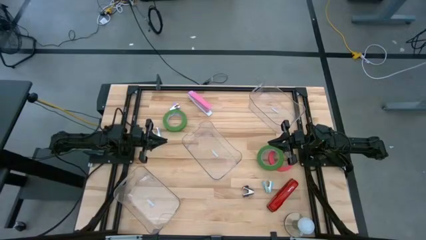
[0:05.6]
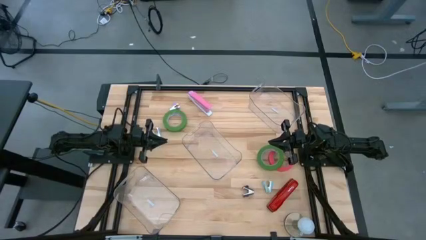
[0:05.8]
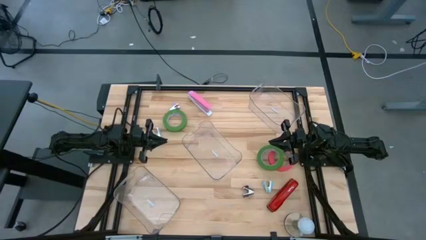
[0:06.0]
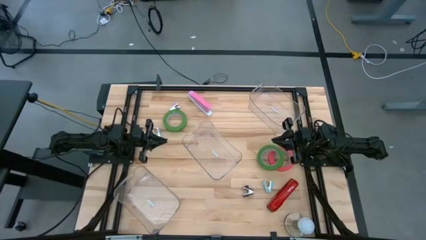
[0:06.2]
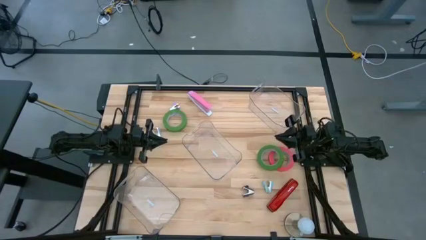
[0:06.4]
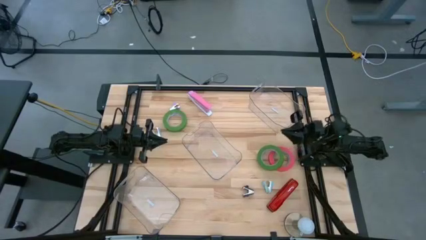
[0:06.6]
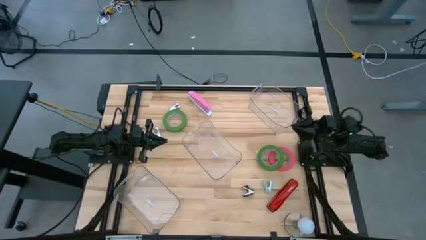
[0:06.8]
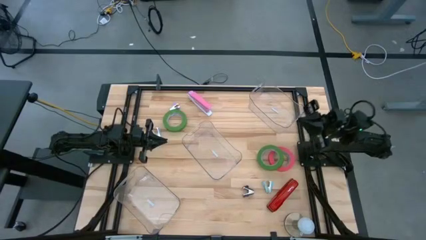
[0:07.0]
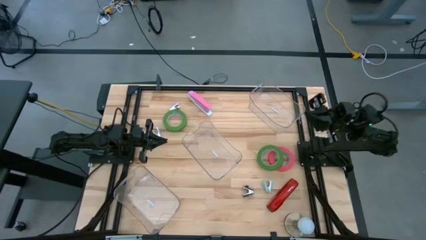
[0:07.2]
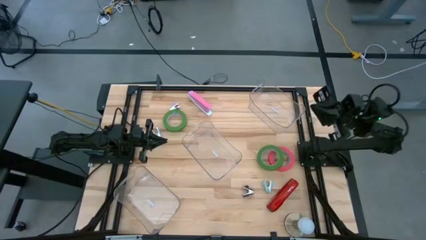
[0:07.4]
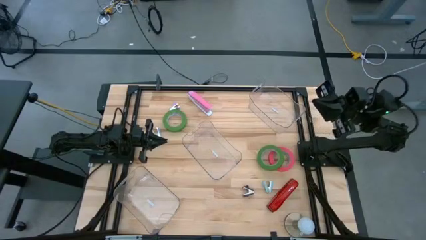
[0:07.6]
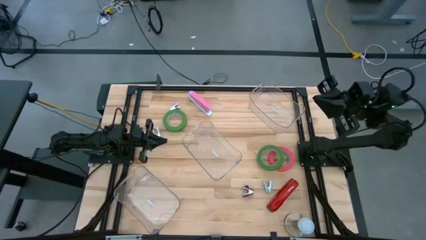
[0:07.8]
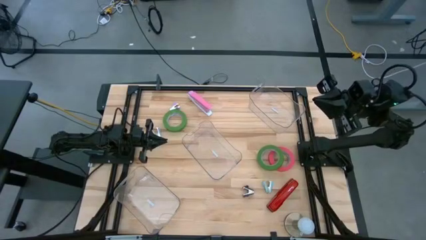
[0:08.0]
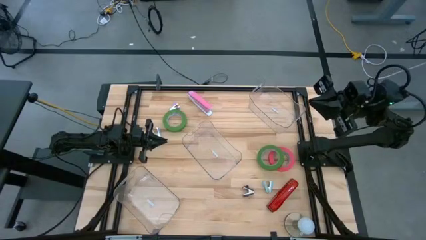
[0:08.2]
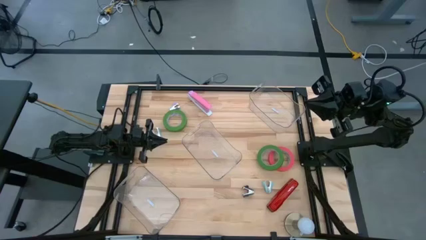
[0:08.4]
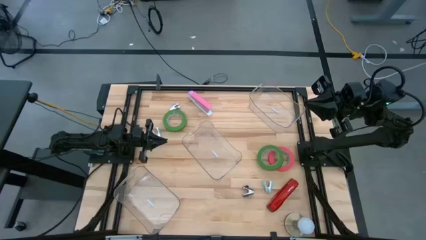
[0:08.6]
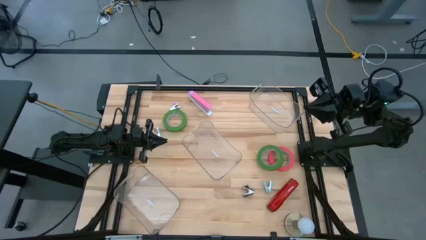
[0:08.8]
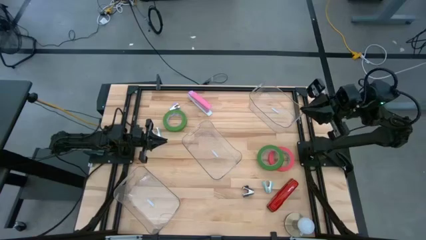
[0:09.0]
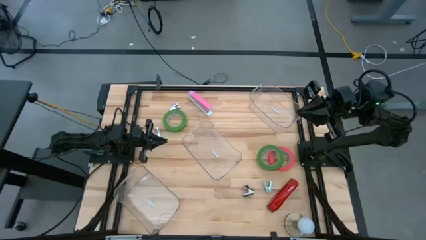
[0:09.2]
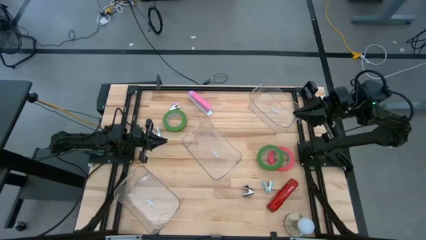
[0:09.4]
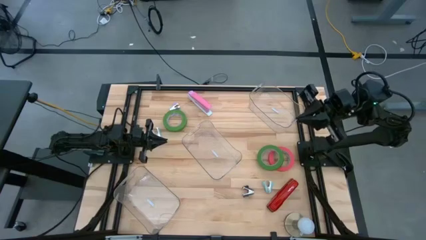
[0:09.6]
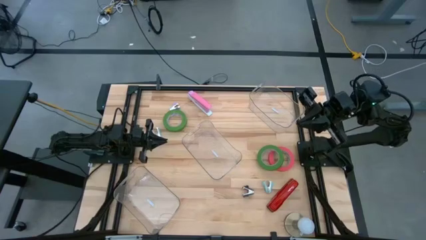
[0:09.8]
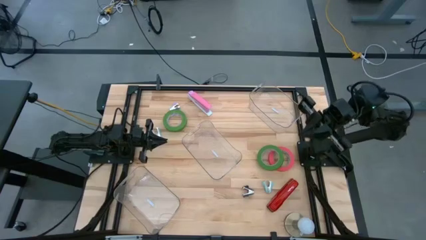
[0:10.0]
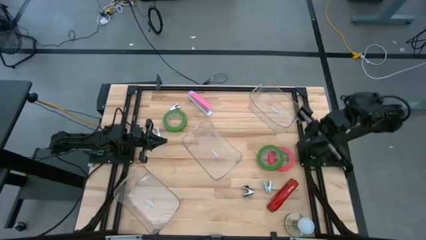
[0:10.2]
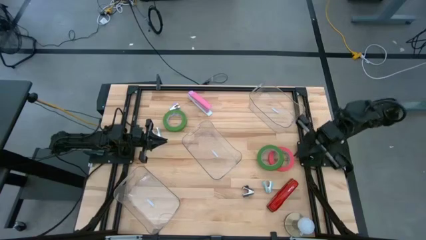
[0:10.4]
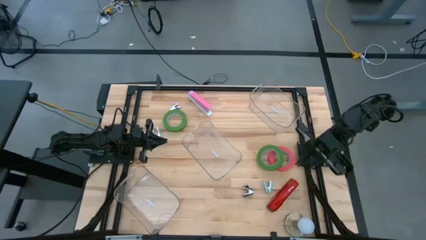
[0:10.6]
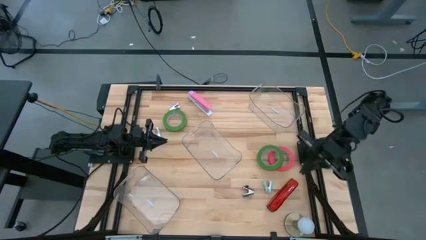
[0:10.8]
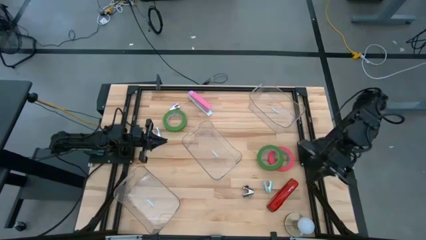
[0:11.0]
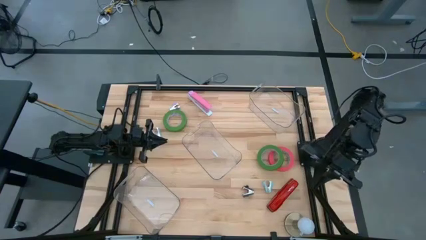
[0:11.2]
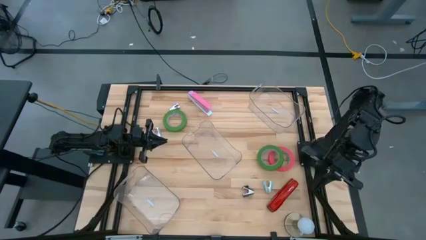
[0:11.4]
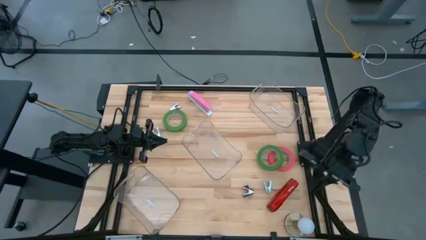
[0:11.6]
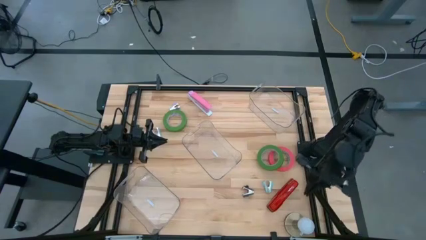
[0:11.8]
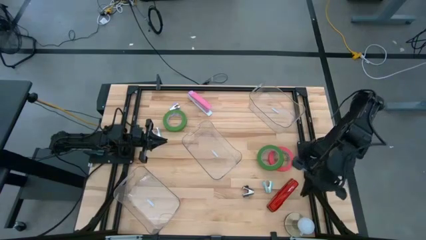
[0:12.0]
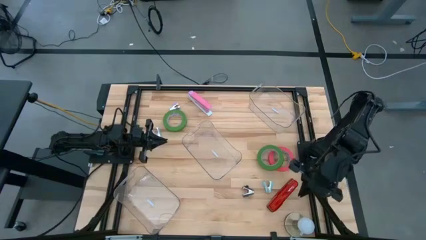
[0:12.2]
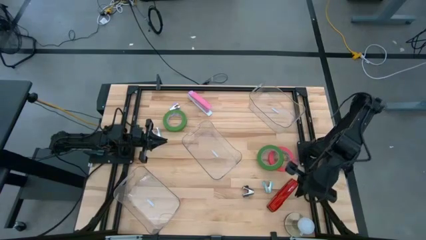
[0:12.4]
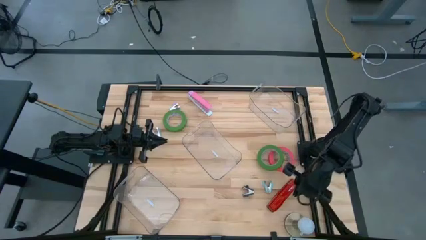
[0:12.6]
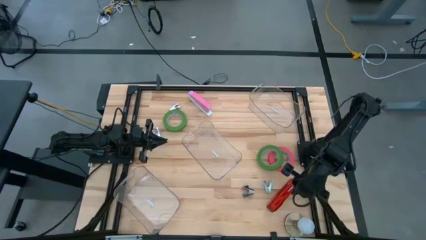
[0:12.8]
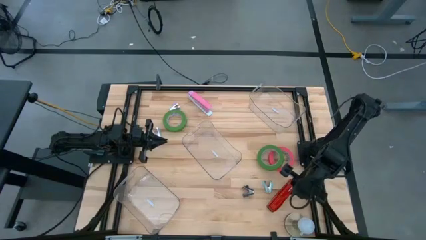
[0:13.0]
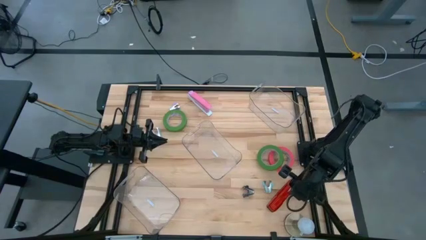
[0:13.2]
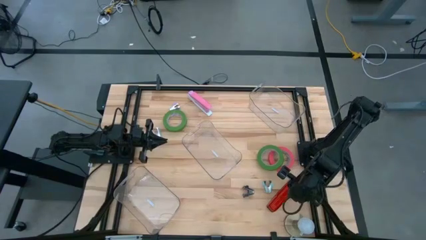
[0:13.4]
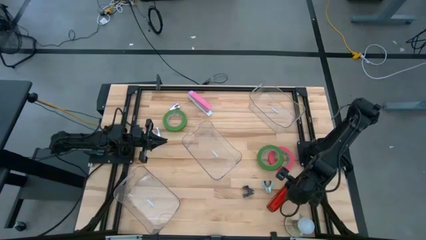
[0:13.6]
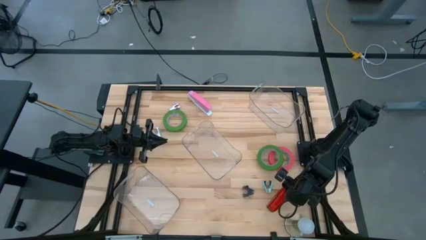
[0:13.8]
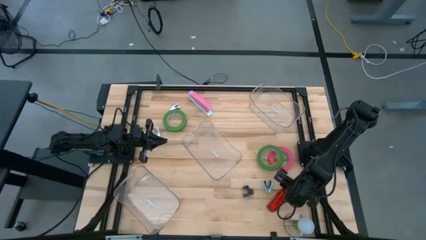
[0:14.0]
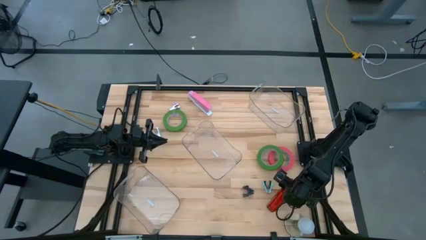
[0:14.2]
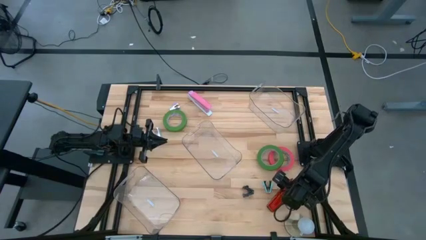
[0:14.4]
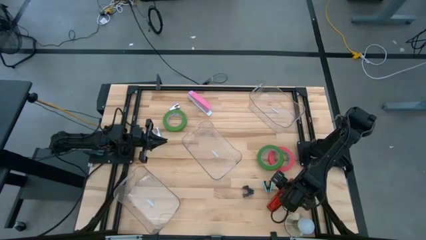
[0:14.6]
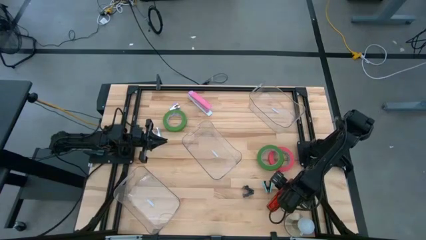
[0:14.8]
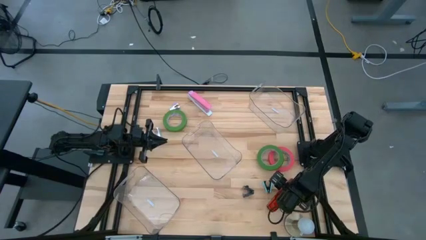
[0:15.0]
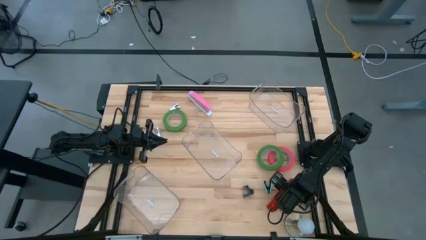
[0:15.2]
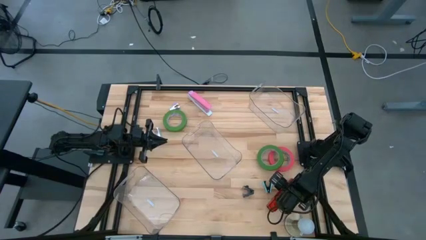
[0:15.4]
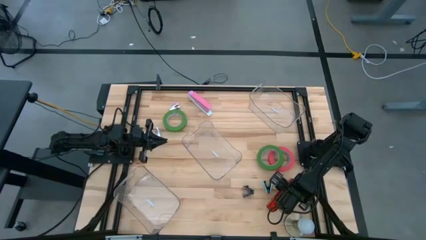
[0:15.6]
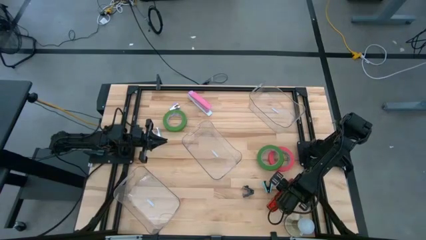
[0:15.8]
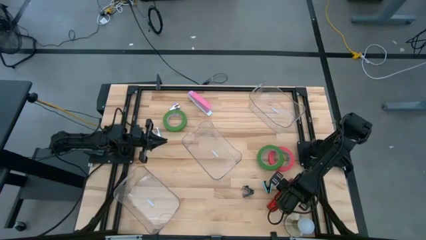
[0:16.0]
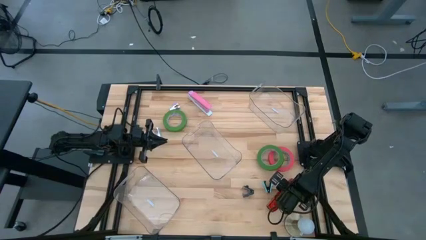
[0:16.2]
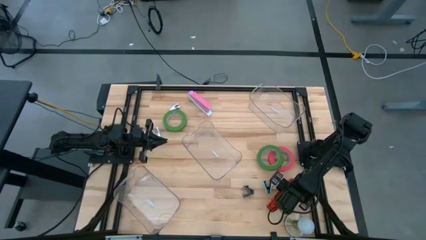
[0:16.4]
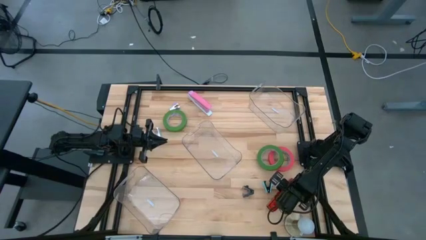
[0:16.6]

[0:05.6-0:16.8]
Task: Pick and place Stapler, Stapler remover, tape
Put the red stapler into the middle transparent bin

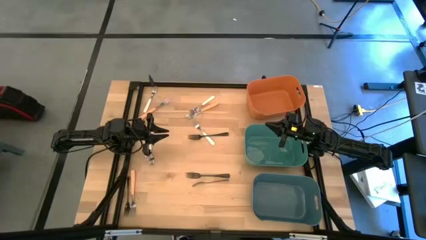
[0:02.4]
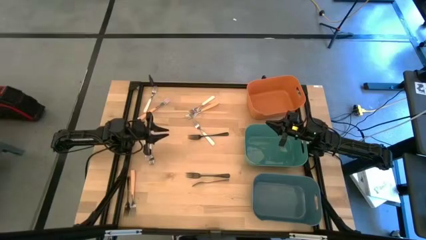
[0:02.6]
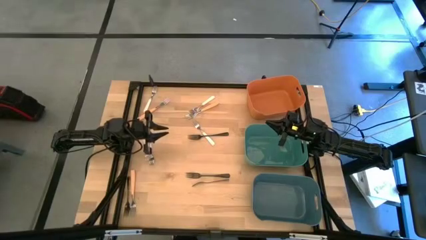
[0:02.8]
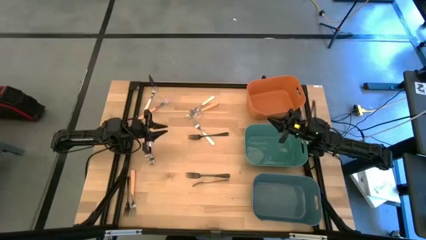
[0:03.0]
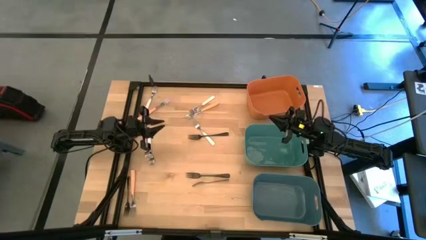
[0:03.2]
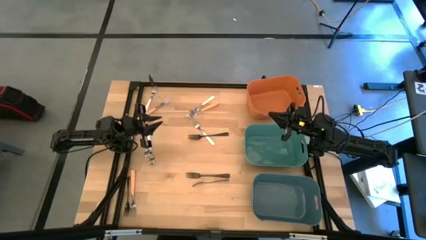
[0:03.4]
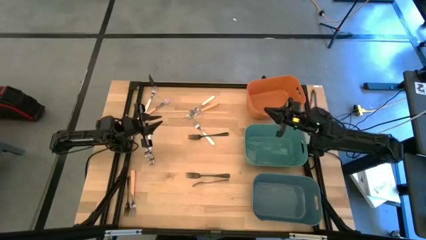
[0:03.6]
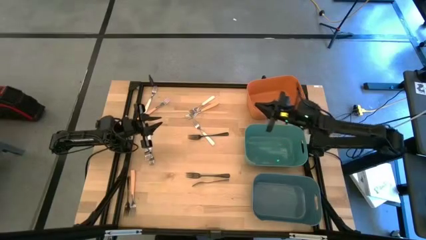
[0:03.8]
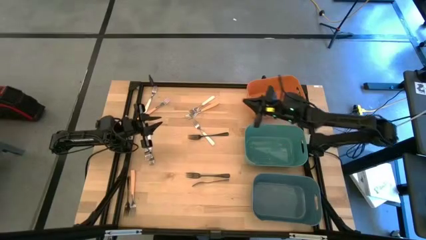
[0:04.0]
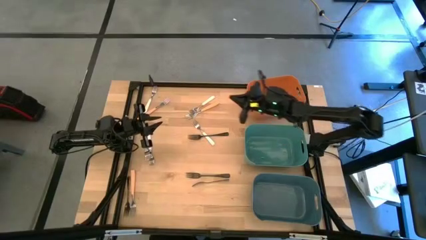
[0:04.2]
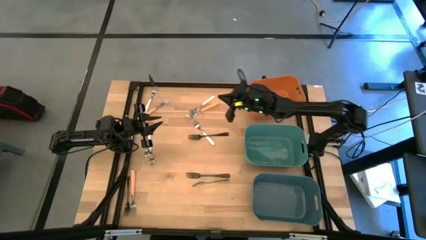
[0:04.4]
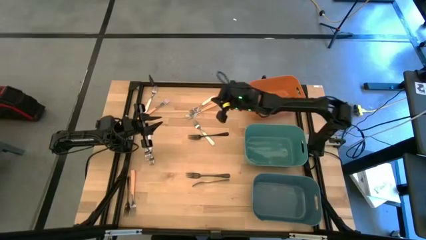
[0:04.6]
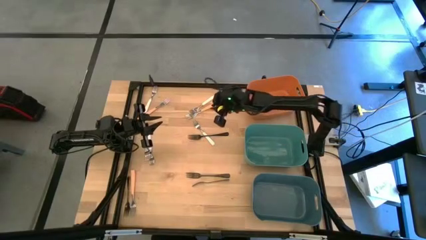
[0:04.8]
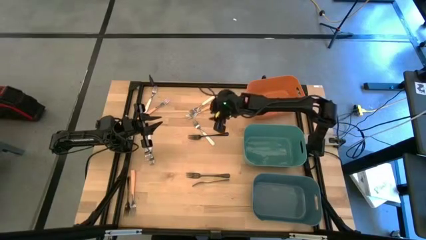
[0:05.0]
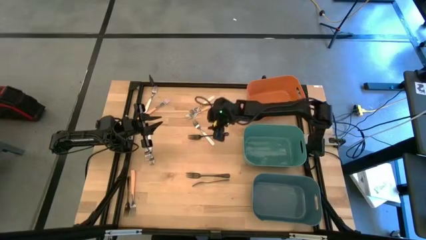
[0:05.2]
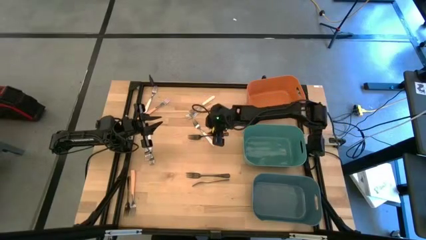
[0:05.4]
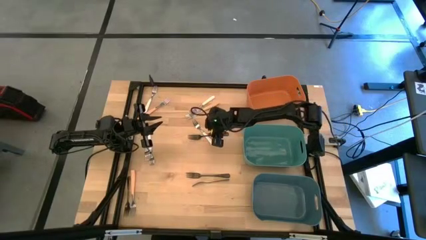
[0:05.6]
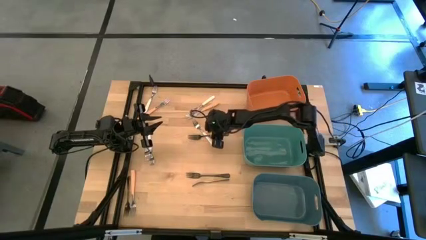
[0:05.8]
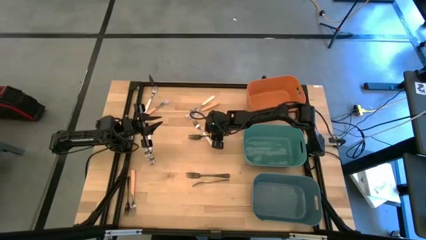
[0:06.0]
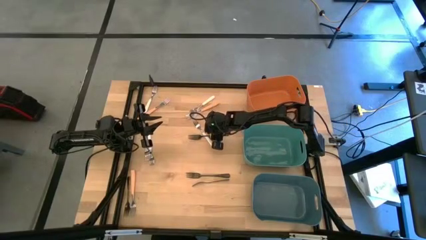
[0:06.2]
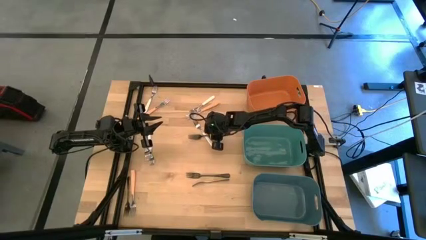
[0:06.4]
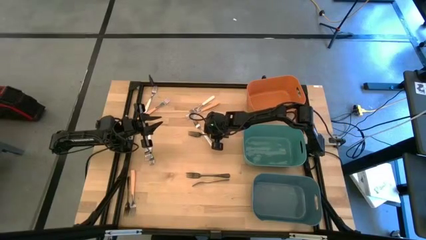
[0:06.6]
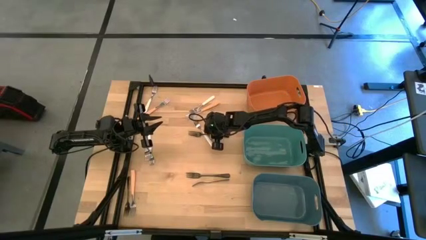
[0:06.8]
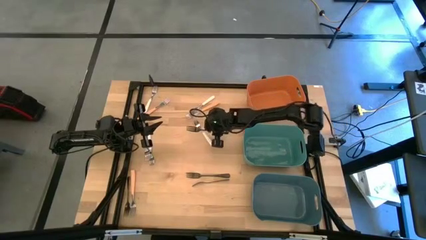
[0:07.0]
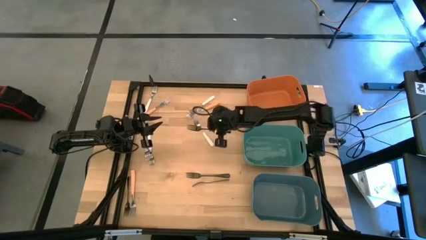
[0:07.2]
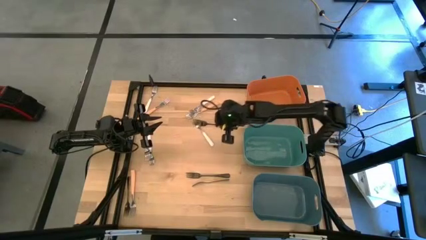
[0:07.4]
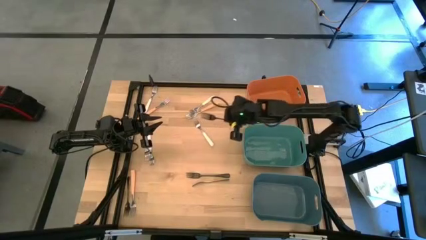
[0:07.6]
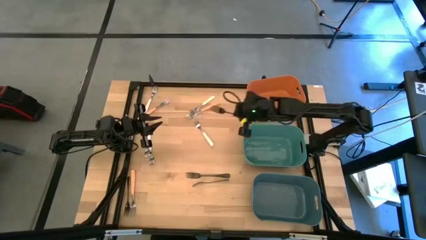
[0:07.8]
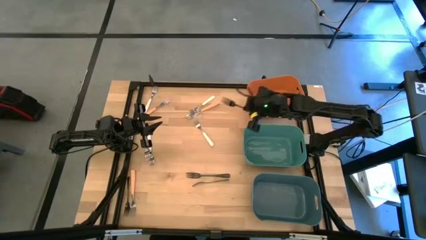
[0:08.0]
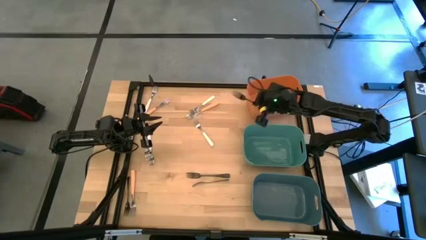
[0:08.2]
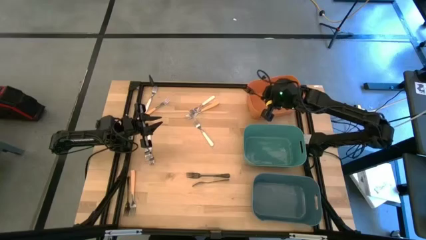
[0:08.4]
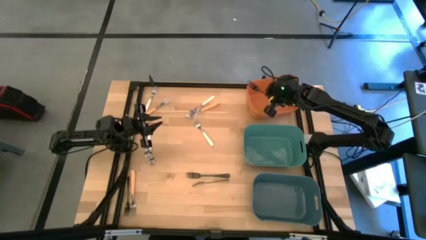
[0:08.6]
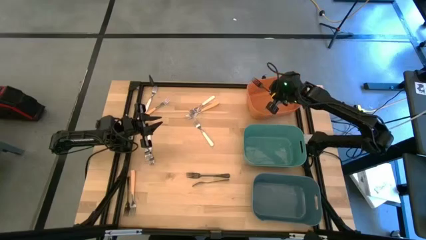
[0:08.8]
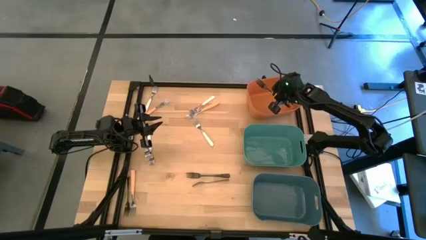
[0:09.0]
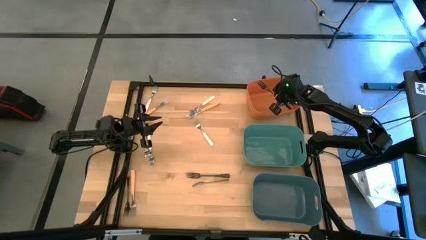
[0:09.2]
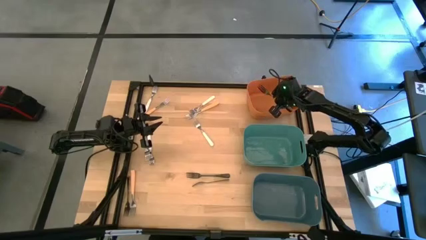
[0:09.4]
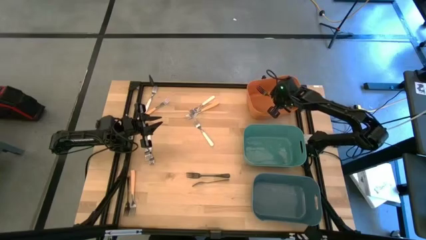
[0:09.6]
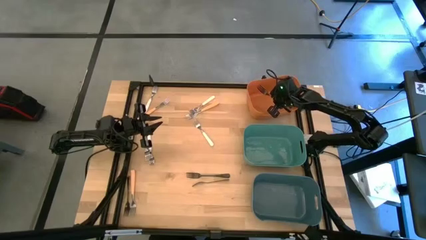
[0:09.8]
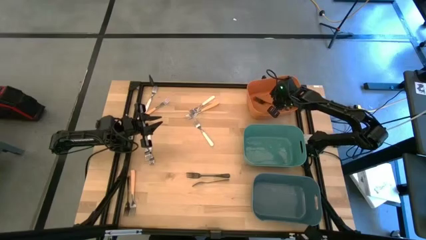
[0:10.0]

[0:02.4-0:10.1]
Task: Sort silverware by color (type)
Put the black fork into the orange bin
